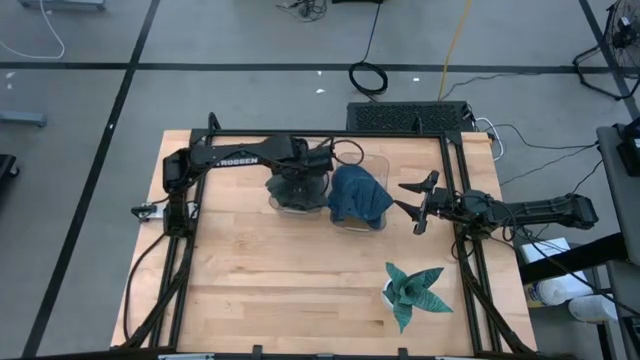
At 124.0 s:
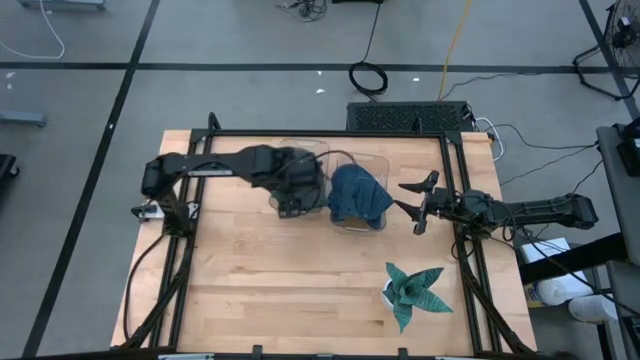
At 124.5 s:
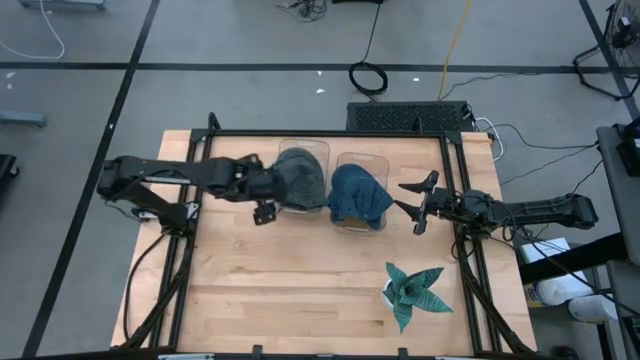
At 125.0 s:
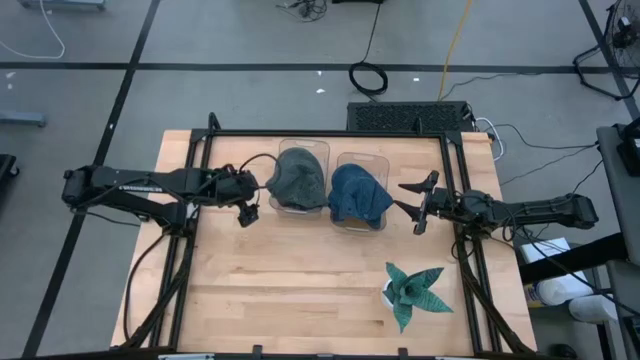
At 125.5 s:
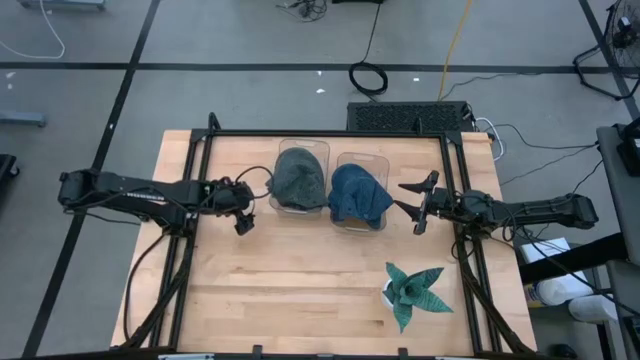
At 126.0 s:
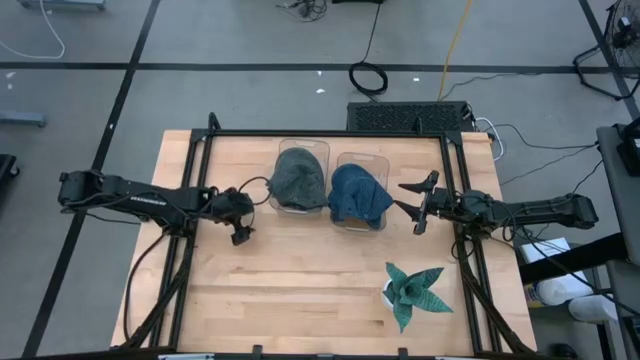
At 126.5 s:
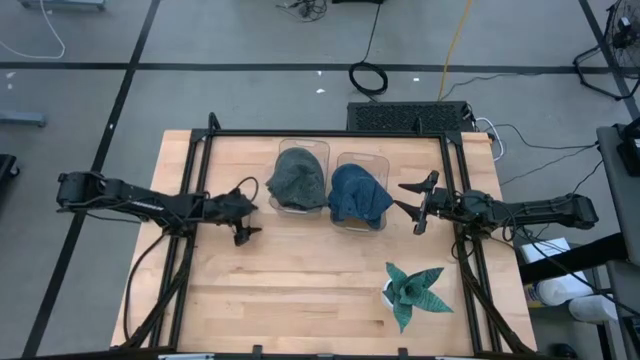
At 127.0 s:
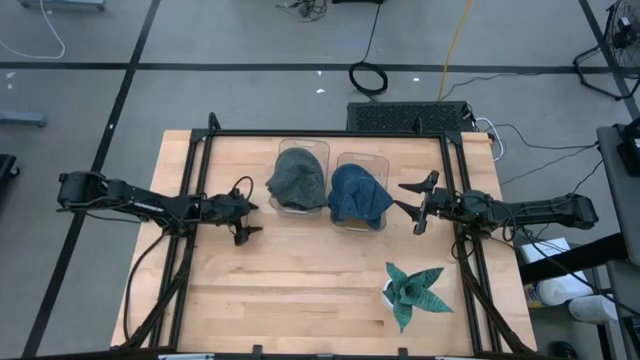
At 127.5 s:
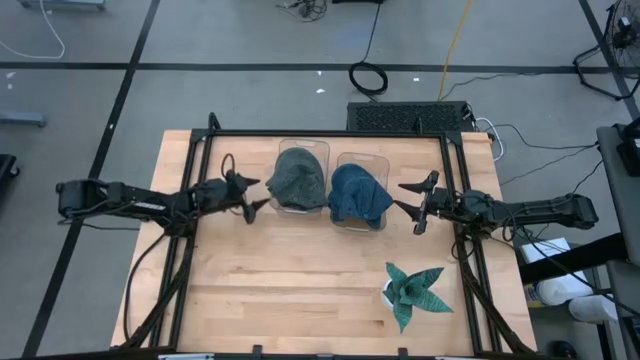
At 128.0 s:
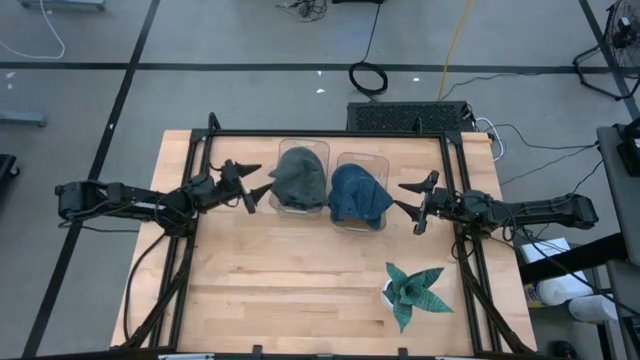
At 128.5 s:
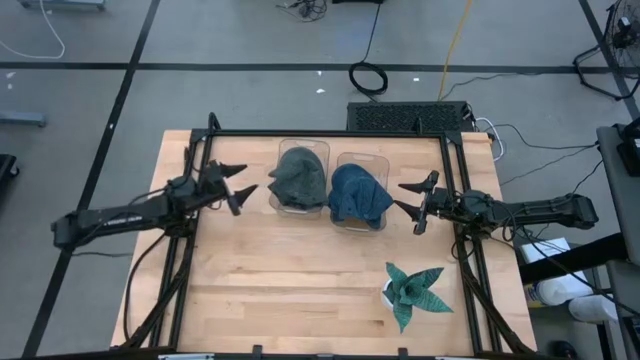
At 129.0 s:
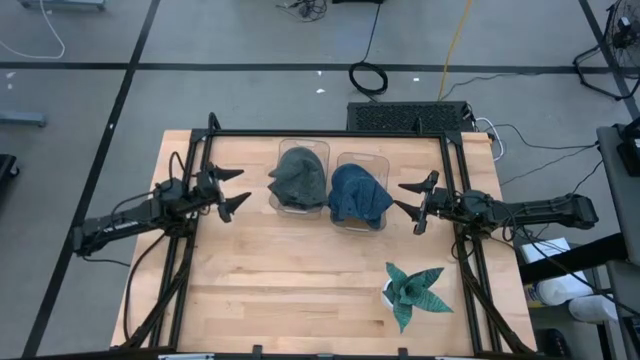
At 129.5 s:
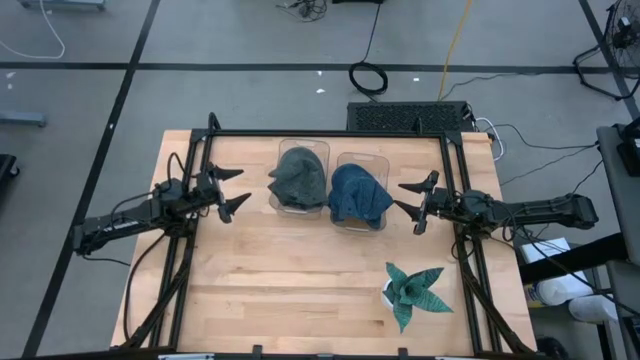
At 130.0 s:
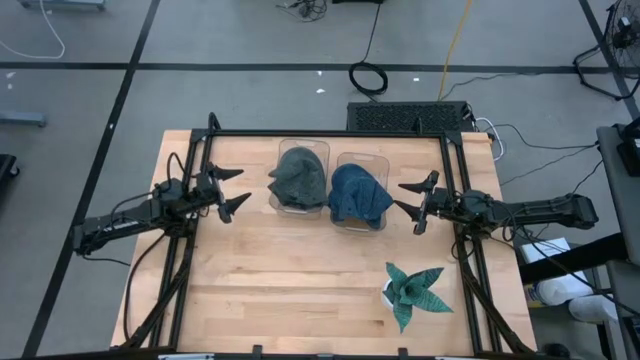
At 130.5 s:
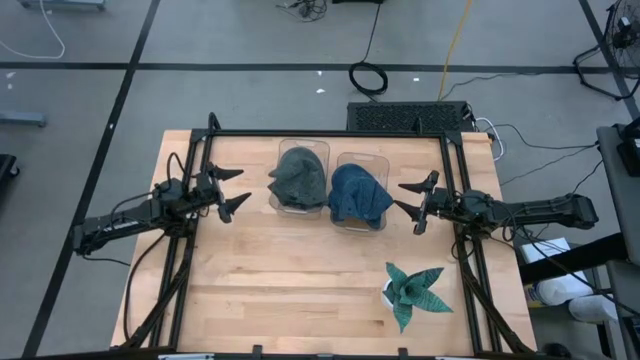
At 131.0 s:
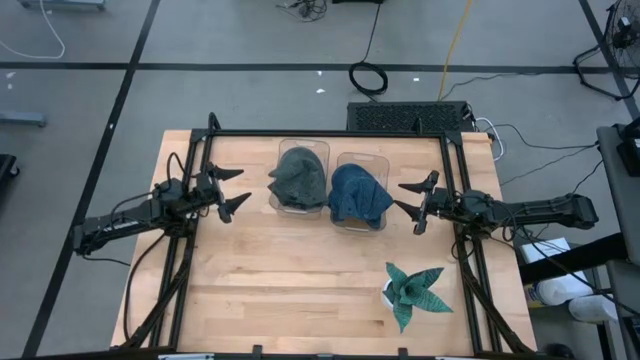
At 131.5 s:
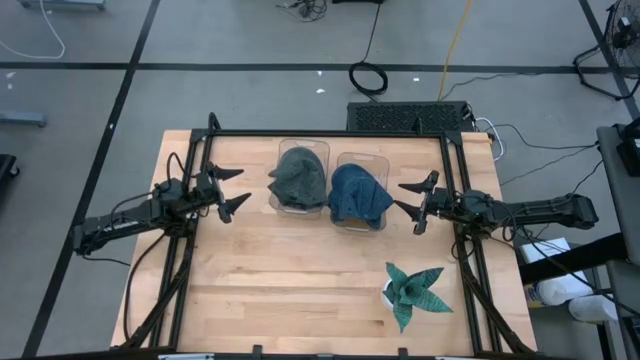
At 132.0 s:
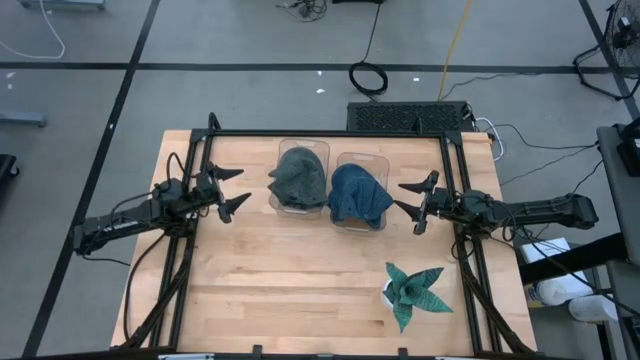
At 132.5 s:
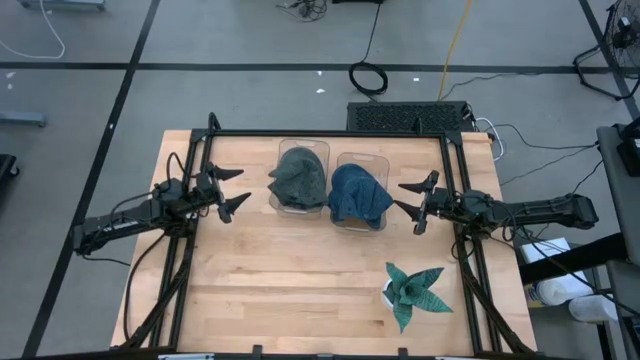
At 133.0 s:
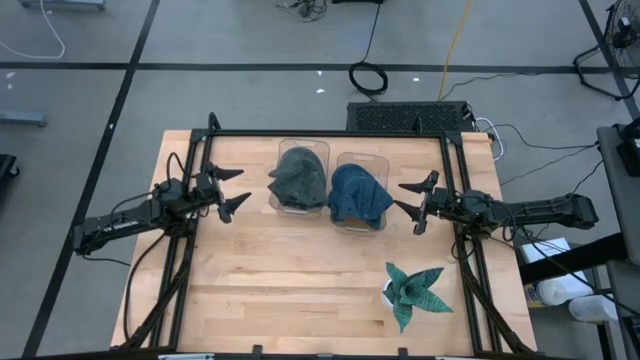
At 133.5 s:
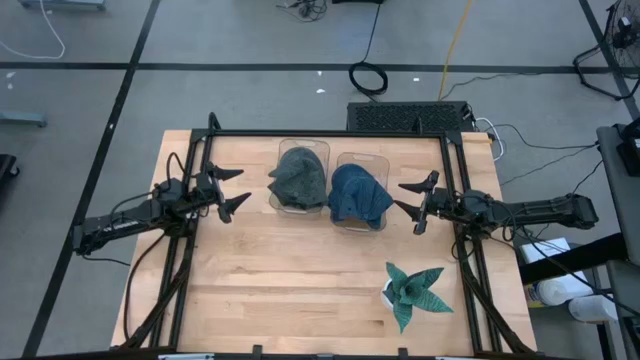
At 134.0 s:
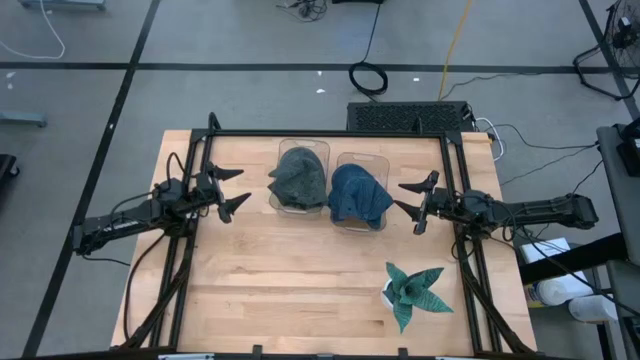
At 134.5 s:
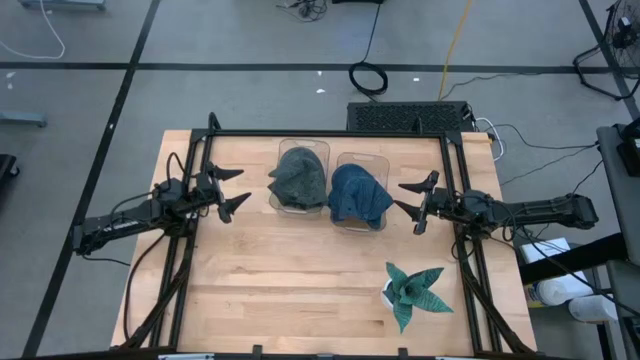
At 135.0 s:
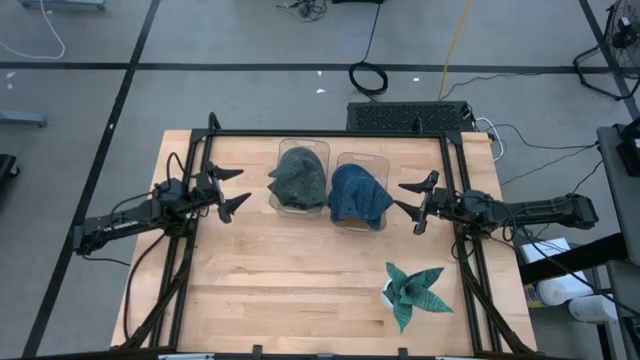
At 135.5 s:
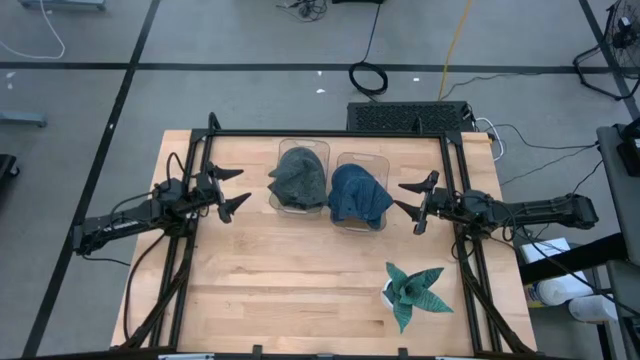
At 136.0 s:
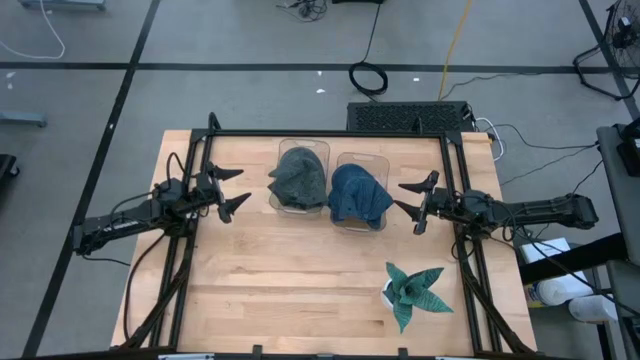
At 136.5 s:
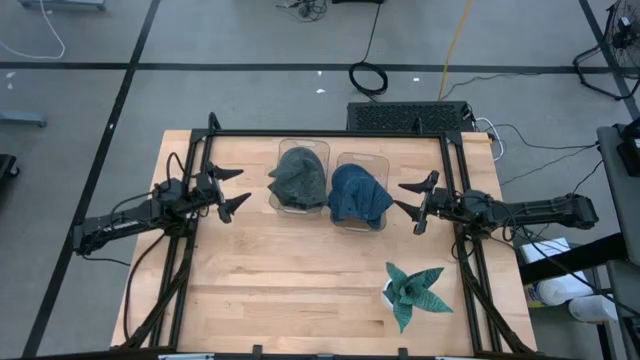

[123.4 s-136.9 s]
Task: Pick & Place hat
Return to Home Position

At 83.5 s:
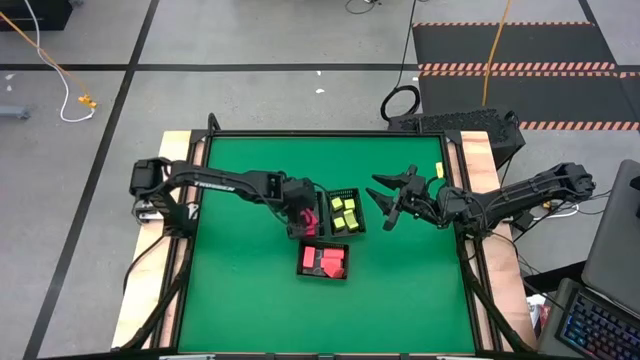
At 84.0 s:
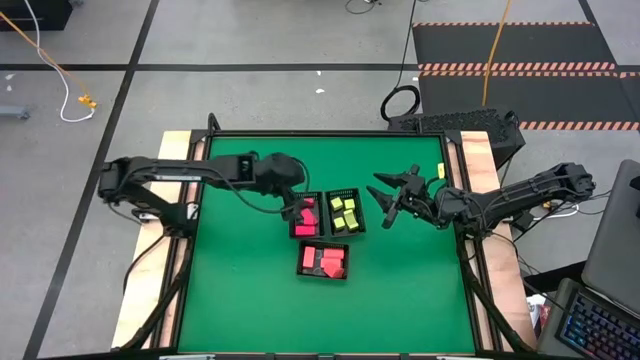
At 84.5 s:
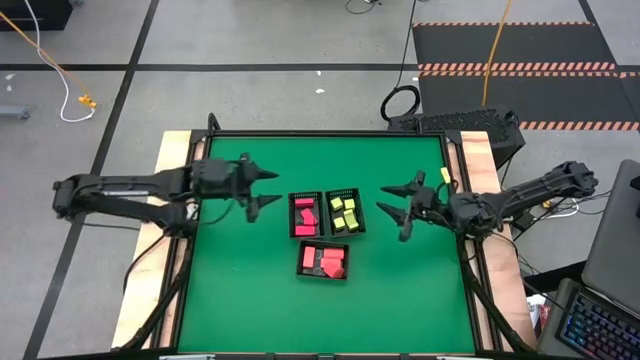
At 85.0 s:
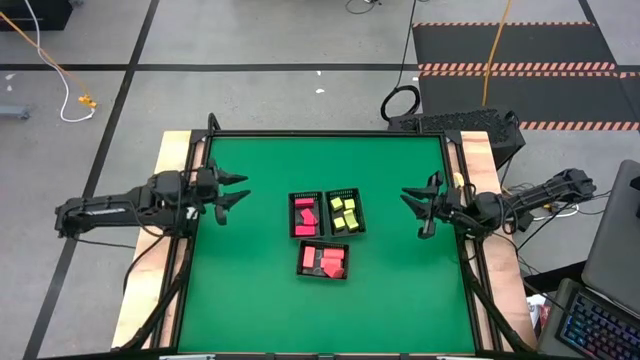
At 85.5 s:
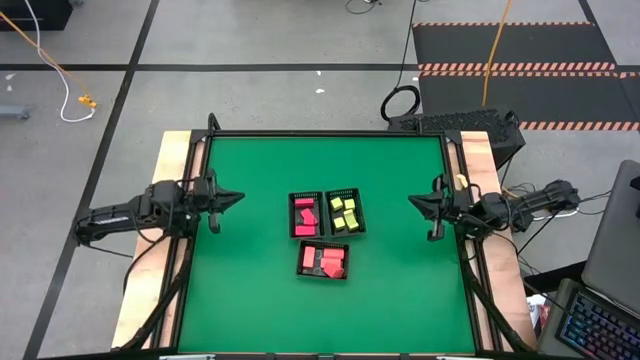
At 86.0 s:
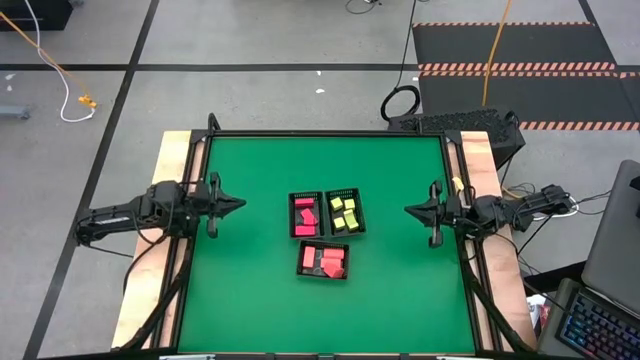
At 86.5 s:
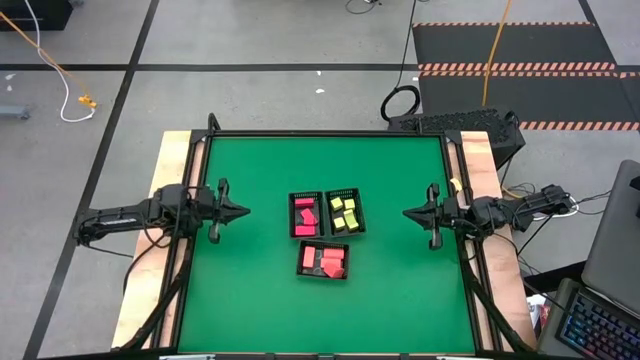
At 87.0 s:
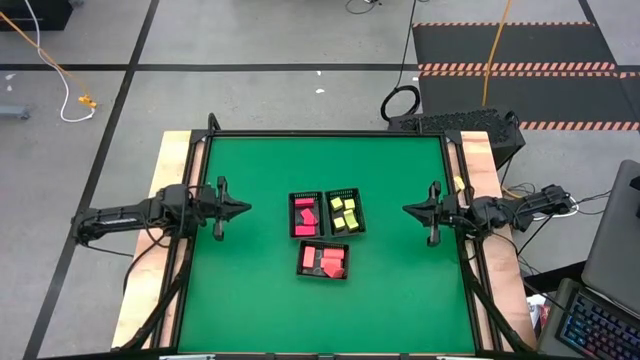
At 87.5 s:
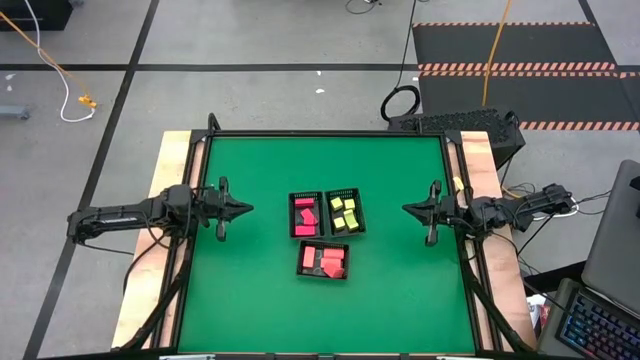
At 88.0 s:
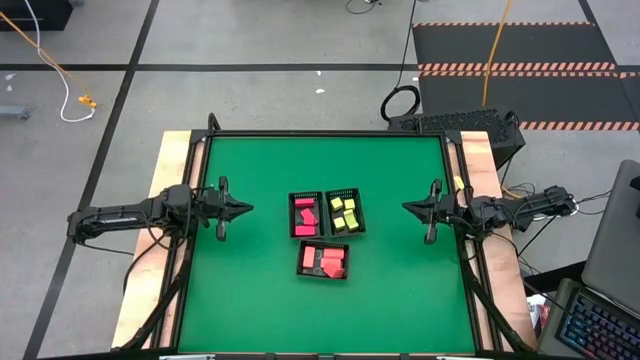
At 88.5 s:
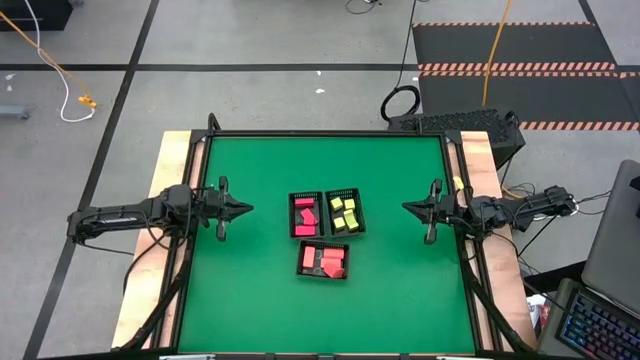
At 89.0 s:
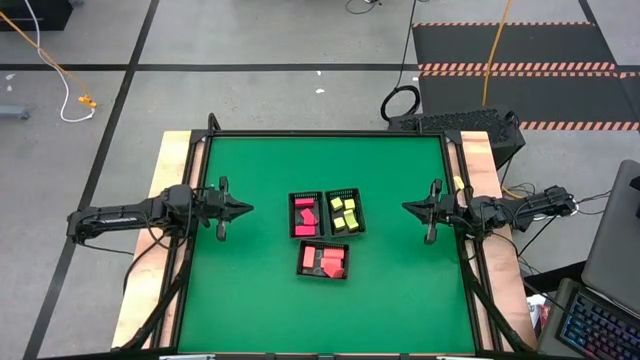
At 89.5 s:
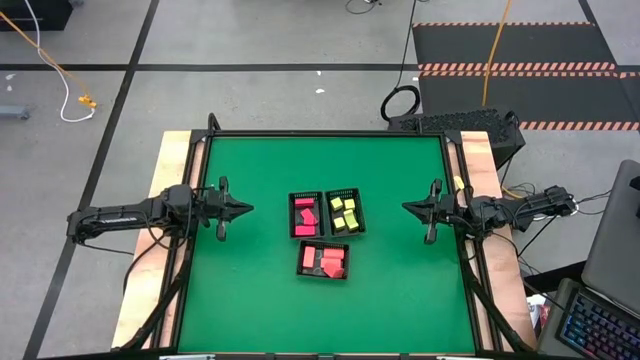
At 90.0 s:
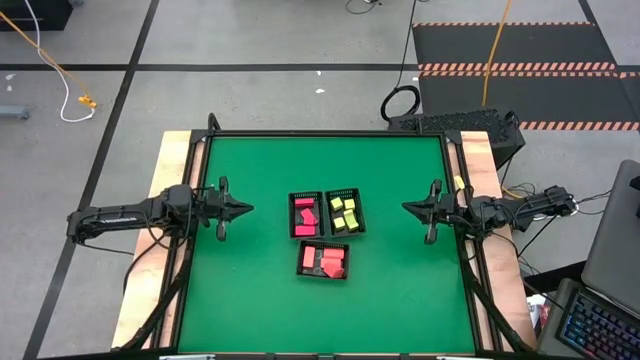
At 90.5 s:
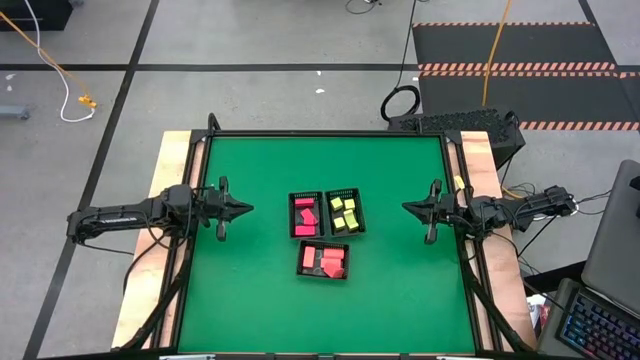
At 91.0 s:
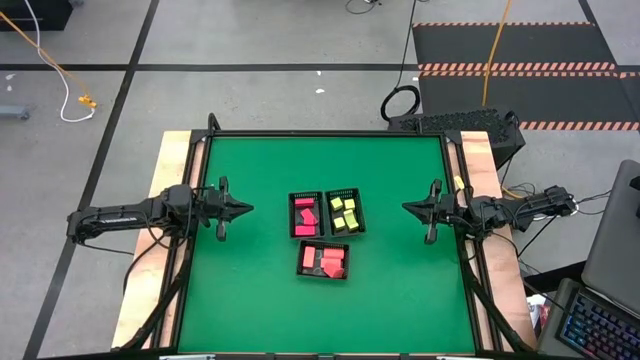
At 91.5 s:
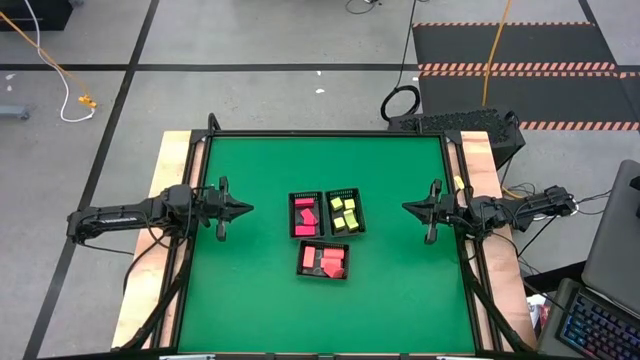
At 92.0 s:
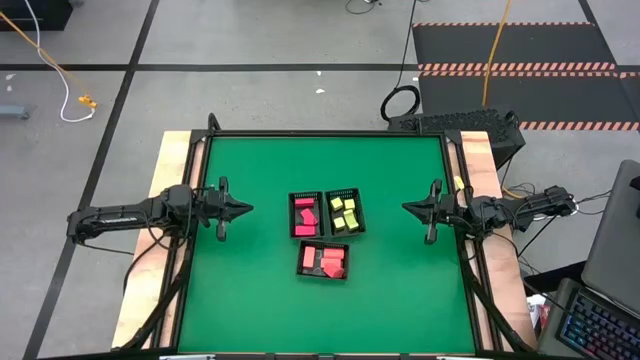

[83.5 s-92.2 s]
Task: Sort & place blocks by color
Return to Home Position
